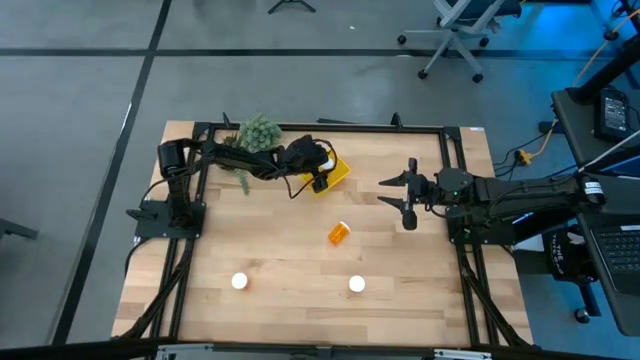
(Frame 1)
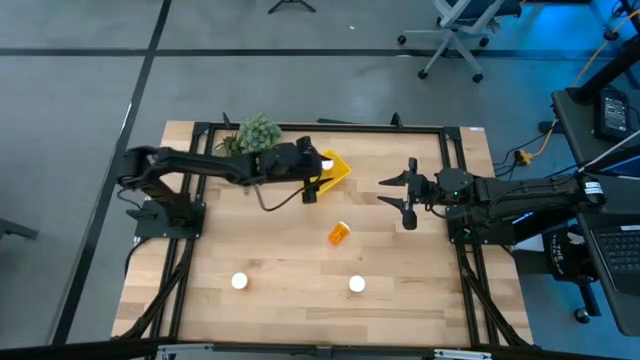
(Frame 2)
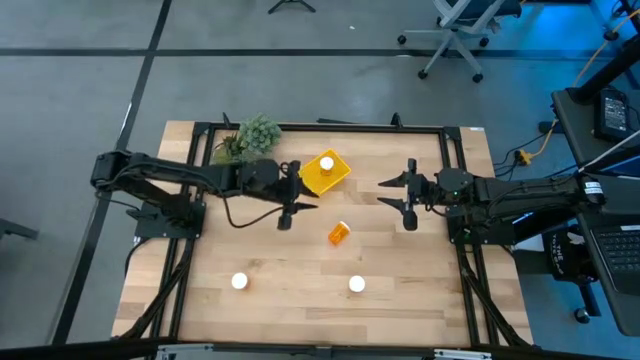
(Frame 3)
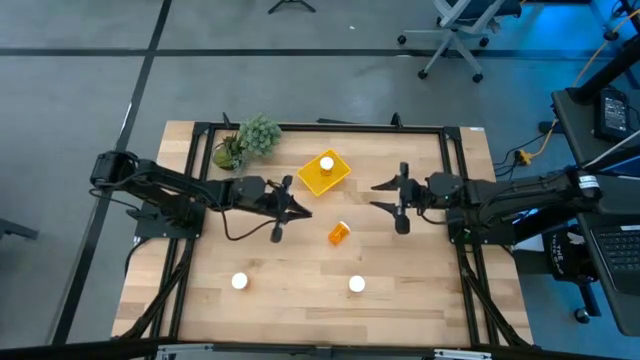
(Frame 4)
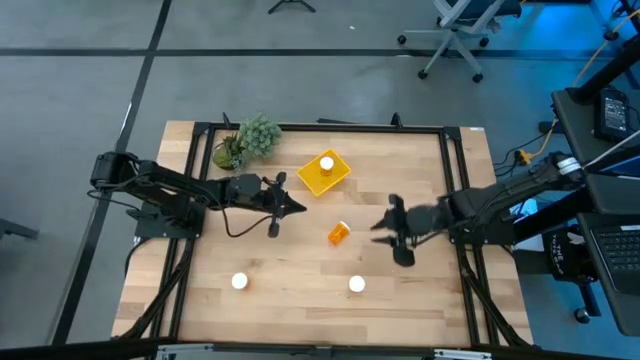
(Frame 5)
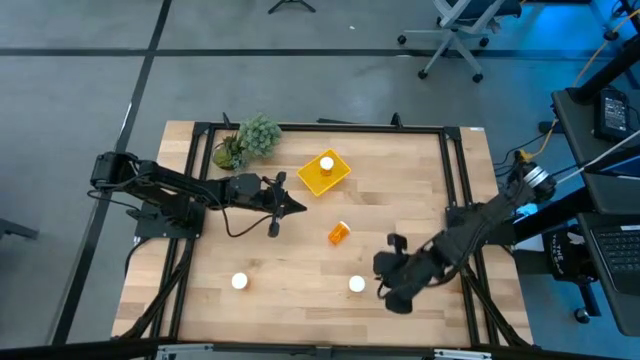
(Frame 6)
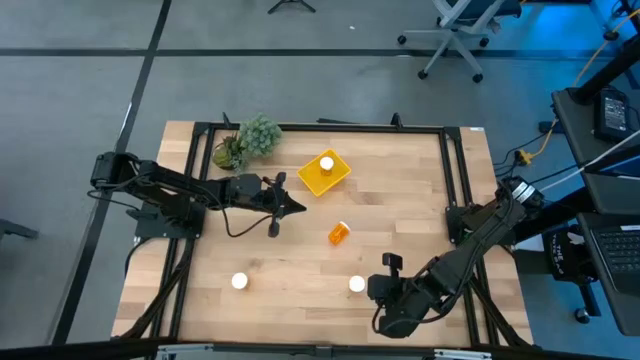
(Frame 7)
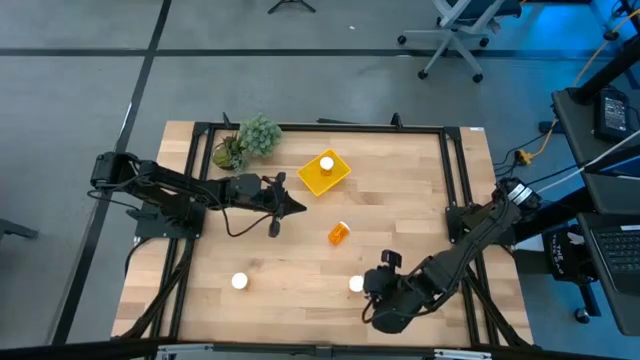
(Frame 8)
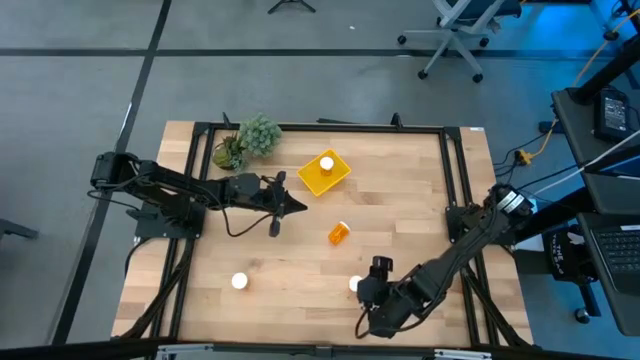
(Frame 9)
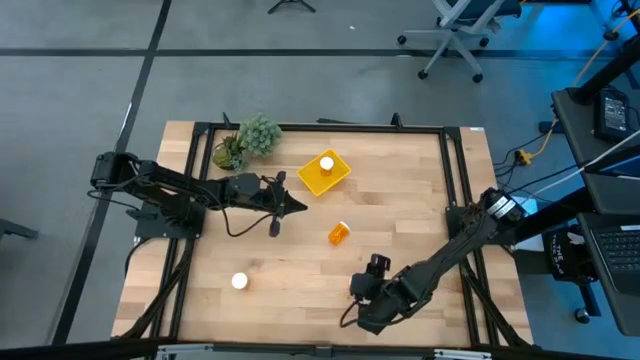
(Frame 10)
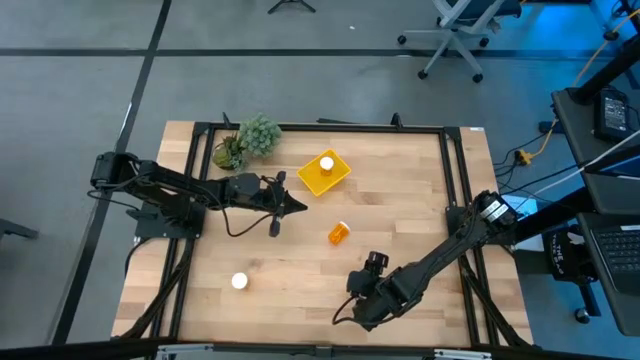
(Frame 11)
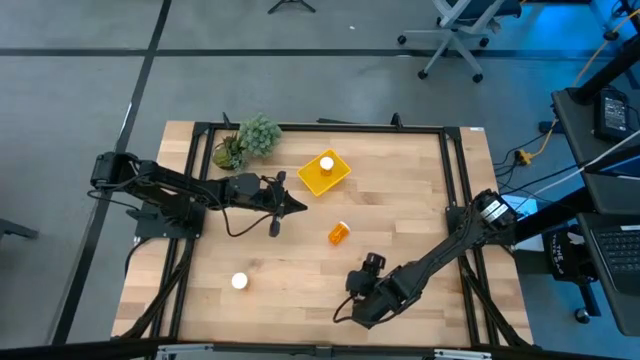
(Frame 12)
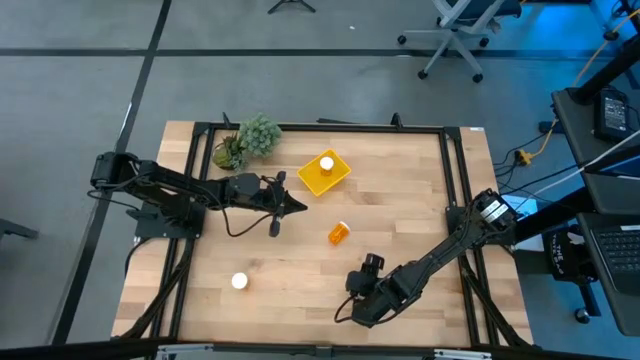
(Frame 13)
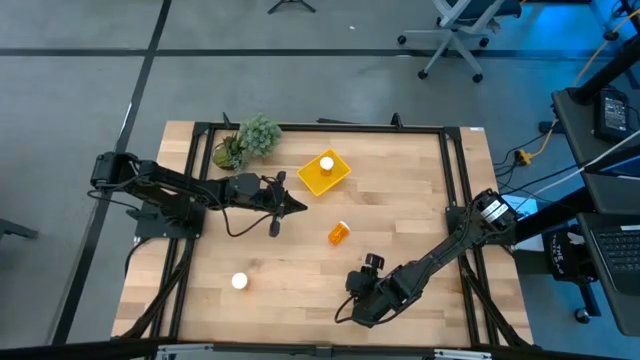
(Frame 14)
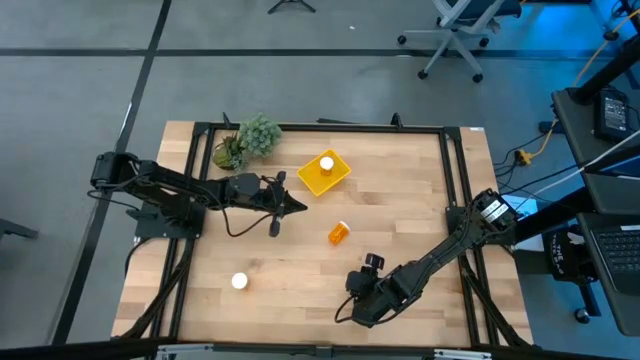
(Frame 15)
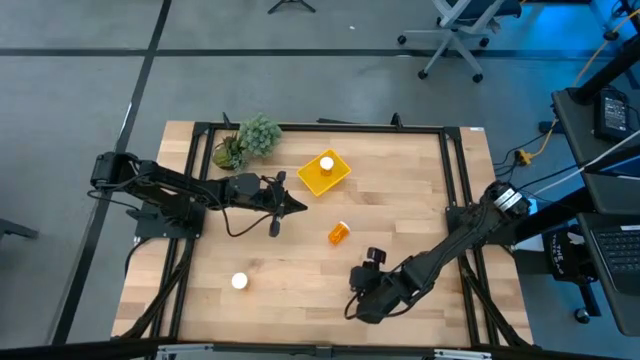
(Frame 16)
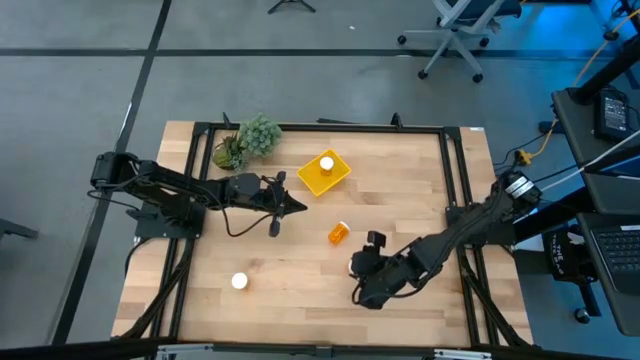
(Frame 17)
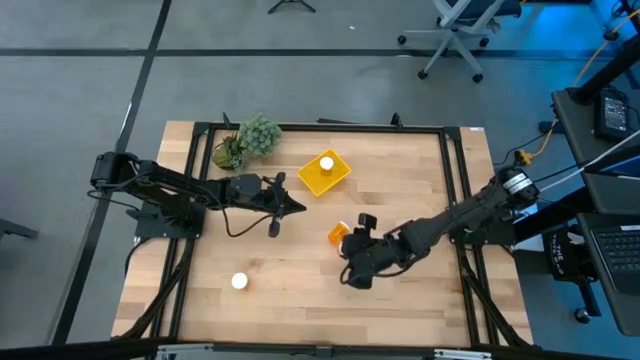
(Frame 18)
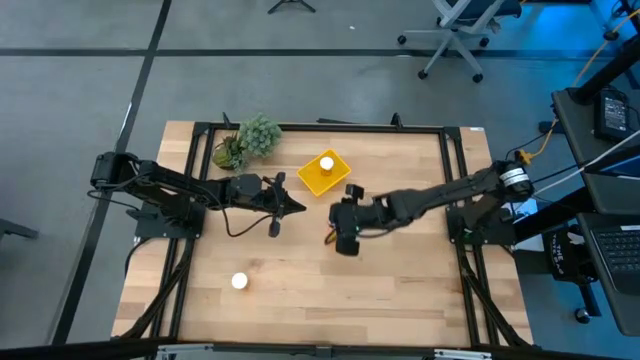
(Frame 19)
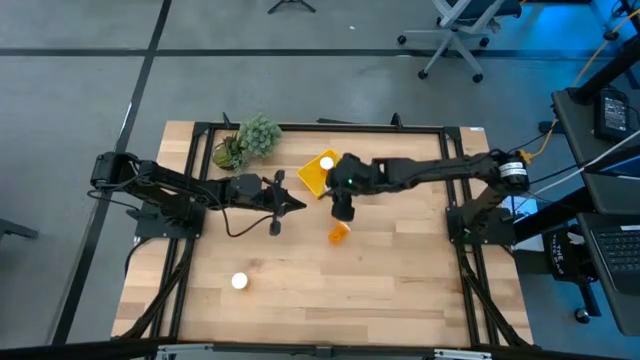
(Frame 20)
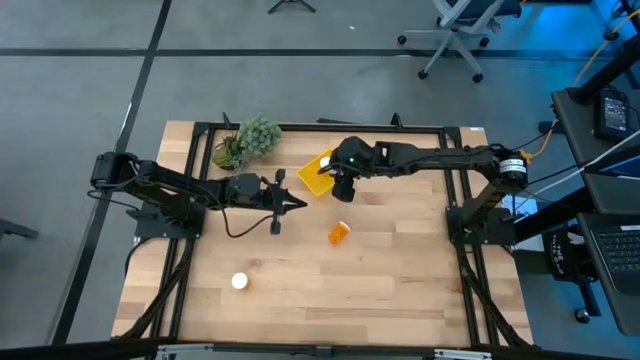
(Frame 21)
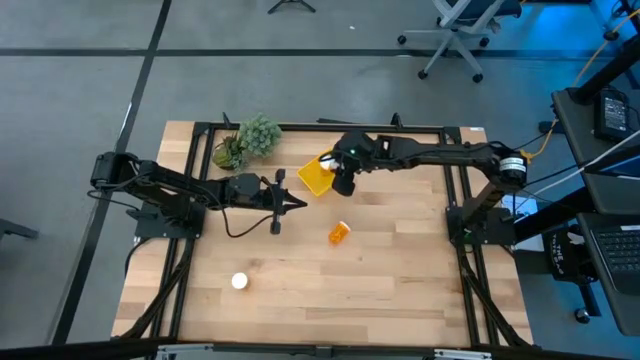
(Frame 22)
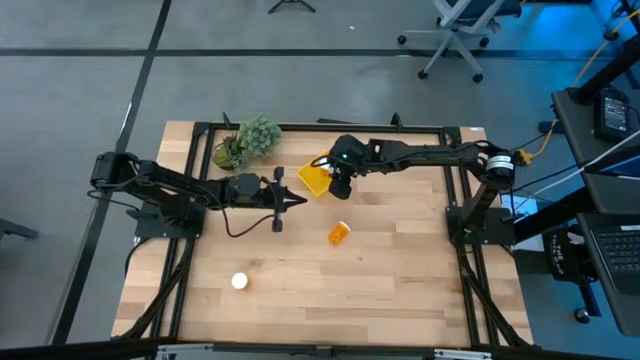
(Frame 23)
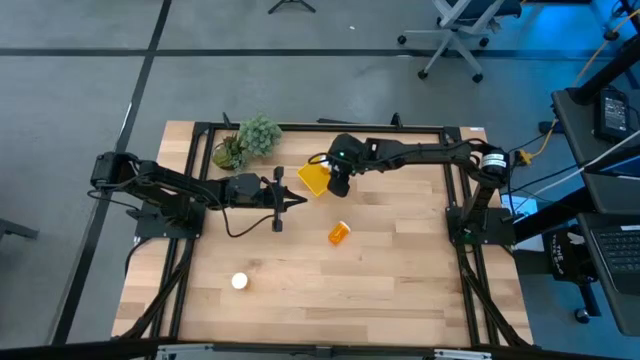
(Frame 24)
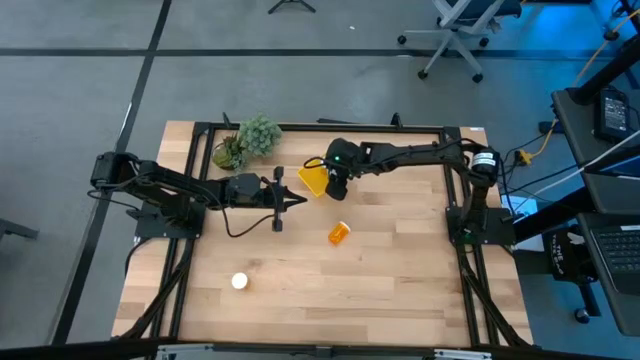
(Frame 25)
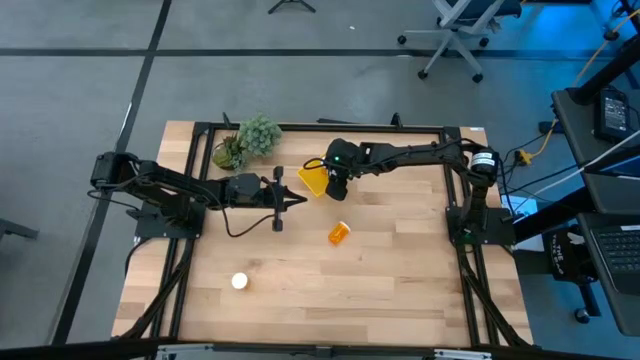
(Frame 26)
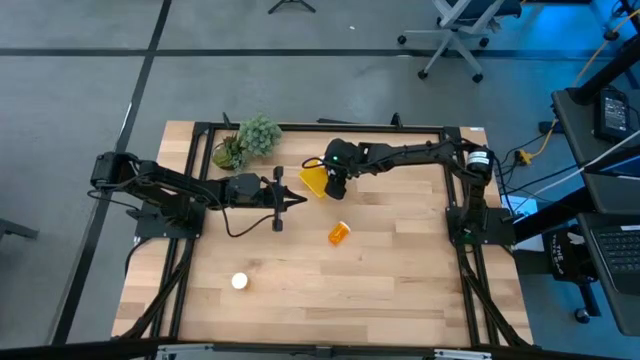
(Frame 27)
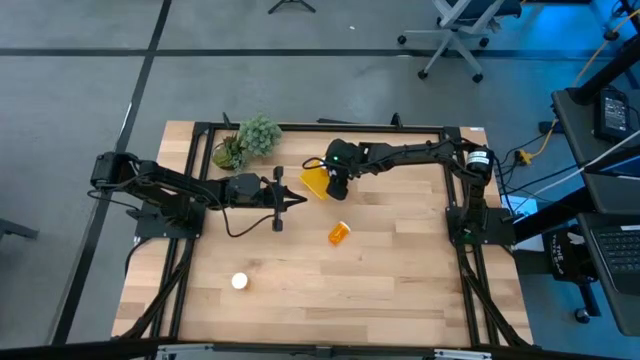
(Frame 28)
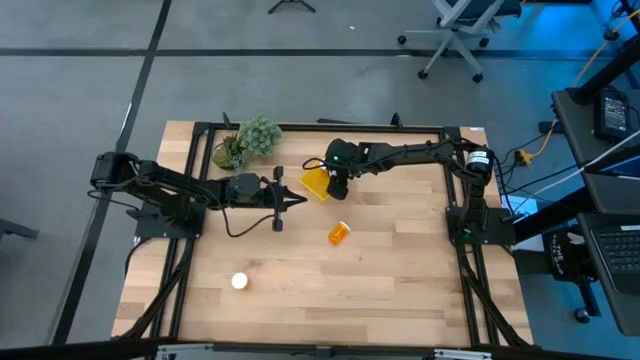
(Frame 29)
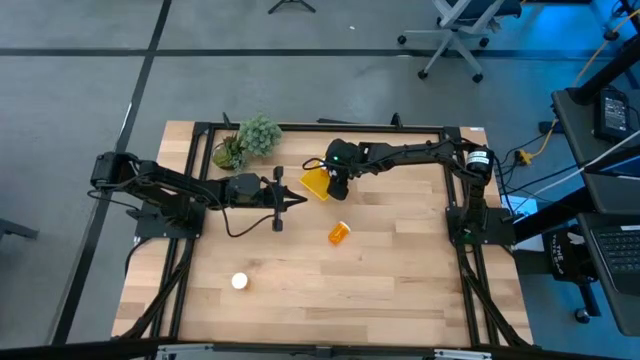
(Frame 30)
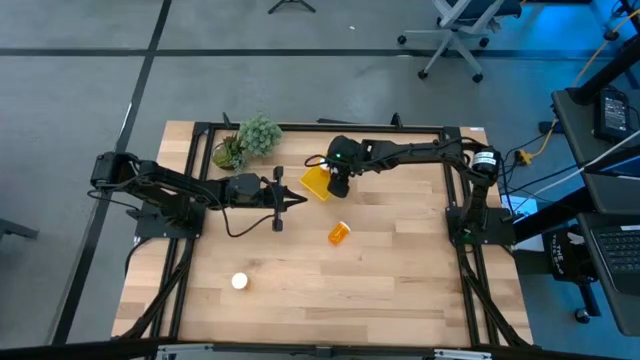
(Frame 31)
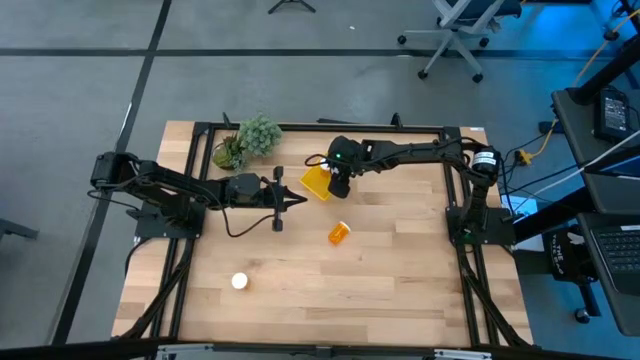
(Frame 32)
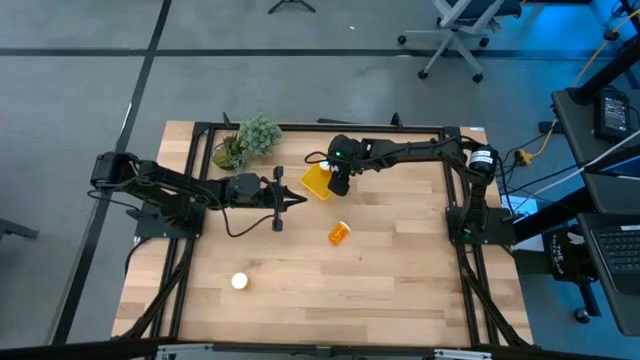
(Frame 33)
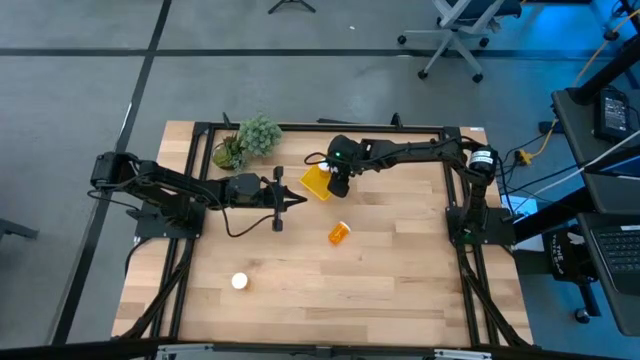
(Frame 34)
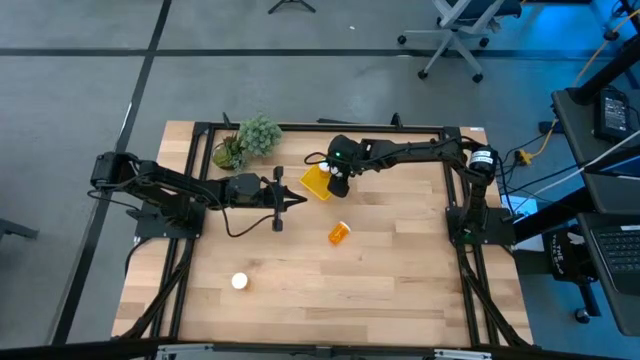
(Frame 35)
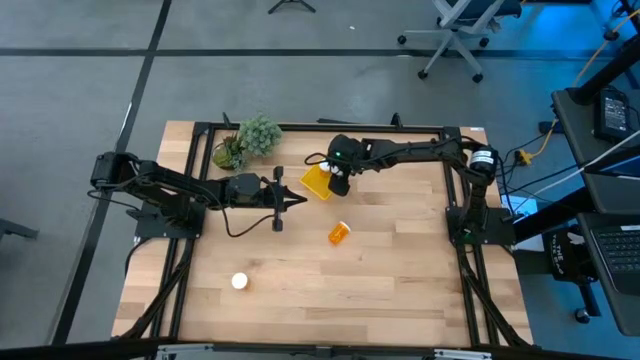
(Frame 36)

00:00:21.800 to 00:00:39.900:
Task: Pick and place pill bottles into a basket
Put the orange pill bottle into the yellow bin

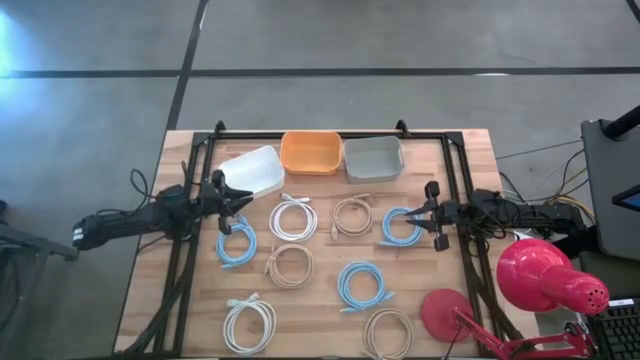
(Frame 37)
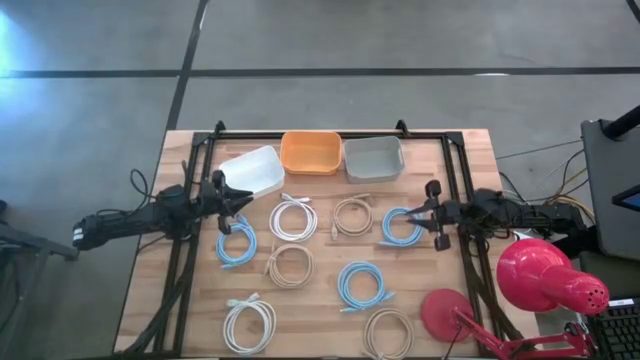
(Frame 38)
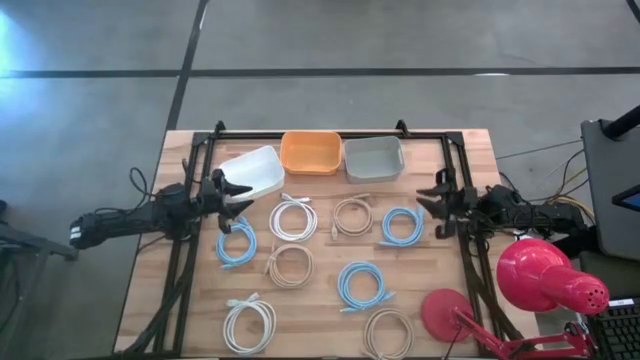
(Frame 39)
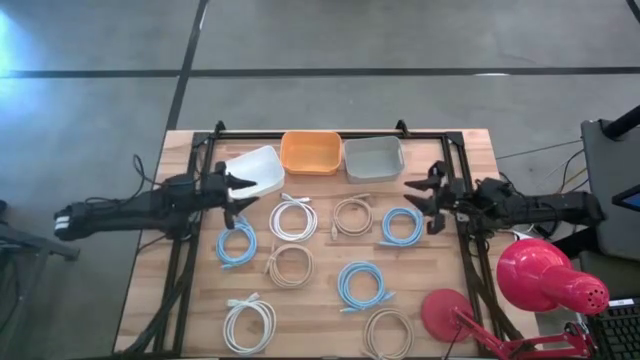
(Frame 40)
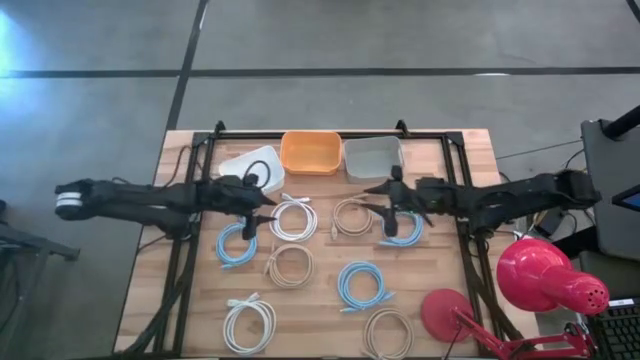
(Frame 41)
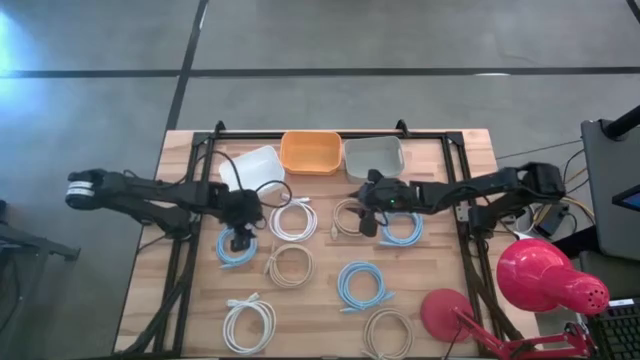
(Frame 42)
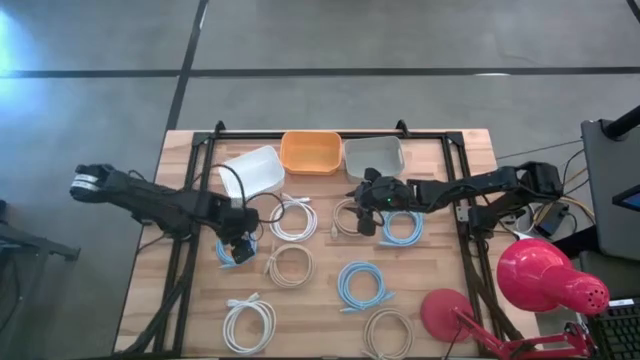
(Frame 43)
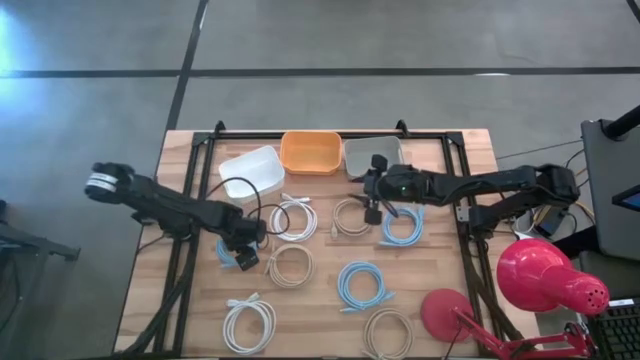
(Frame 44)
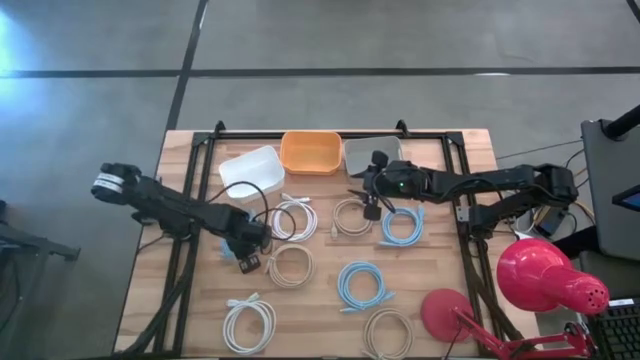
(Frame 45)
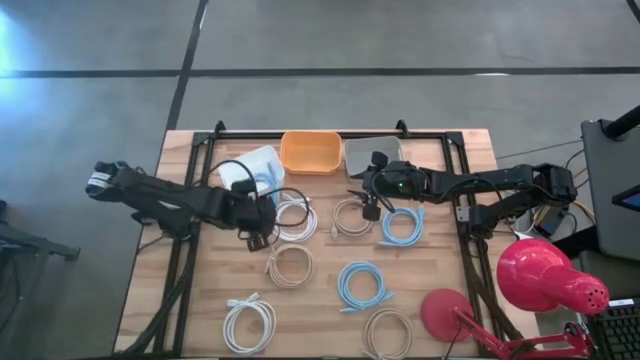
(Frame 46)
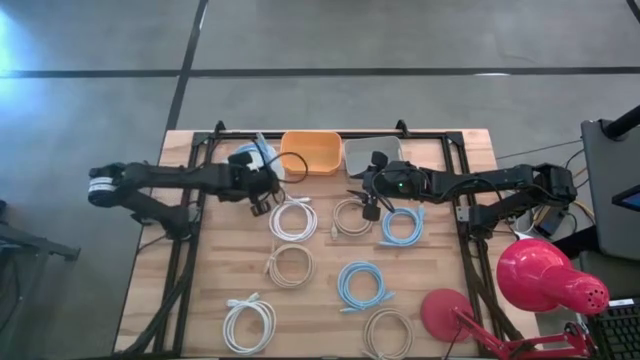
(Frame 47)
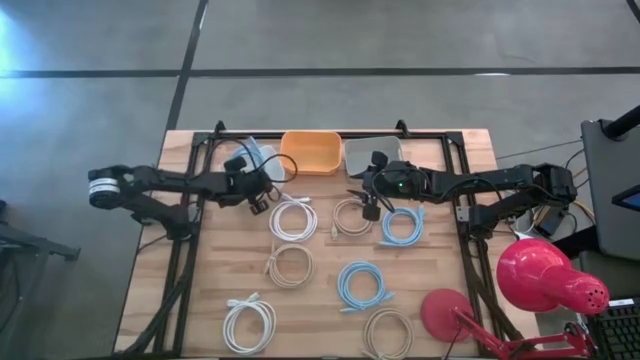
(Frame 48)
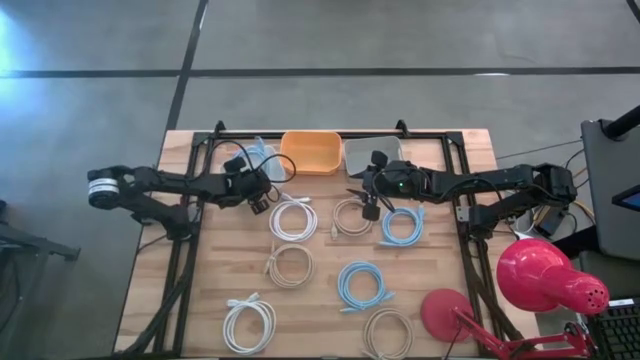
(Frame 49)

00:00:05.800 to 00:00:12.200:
Task: Sort HDMI cables
Put the left light blue HDMI cable into the white bin
